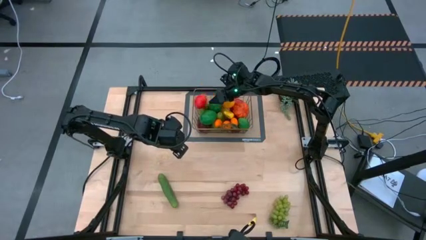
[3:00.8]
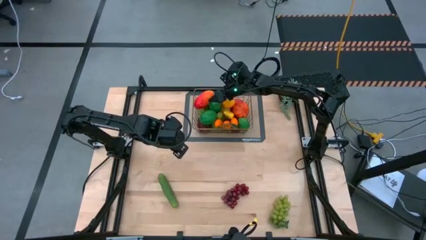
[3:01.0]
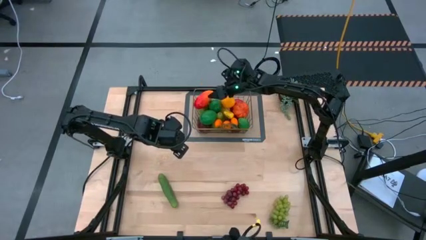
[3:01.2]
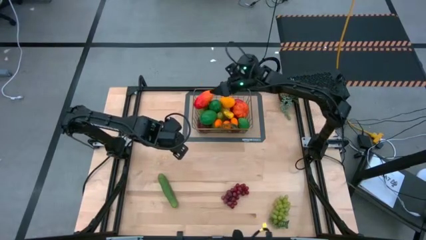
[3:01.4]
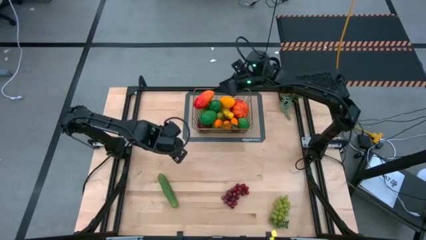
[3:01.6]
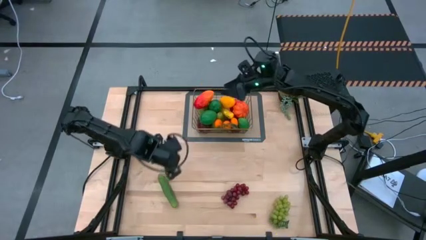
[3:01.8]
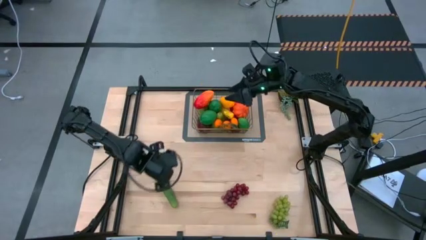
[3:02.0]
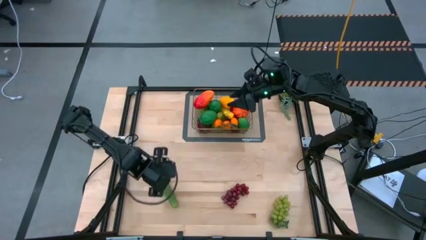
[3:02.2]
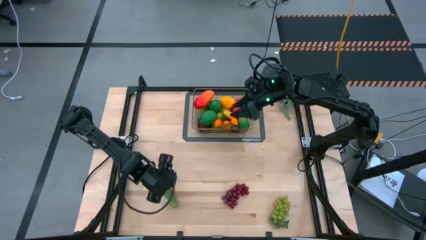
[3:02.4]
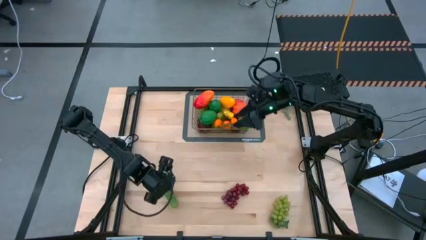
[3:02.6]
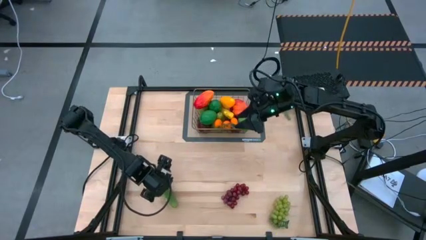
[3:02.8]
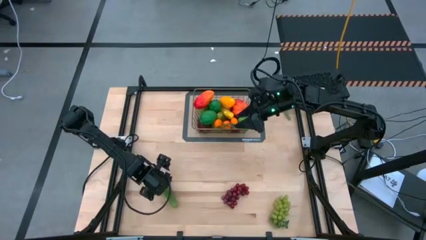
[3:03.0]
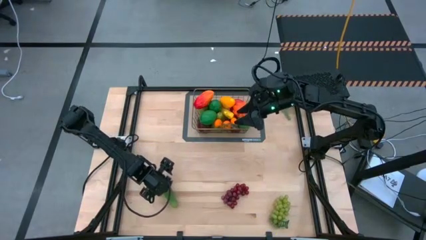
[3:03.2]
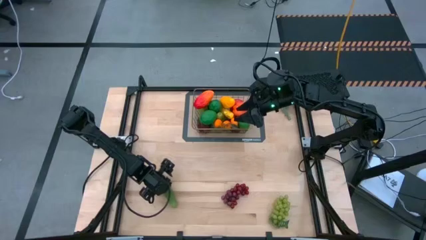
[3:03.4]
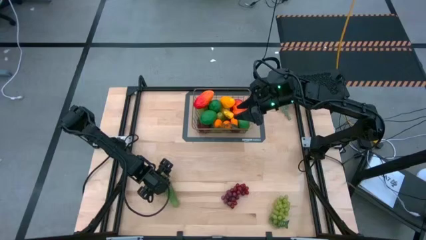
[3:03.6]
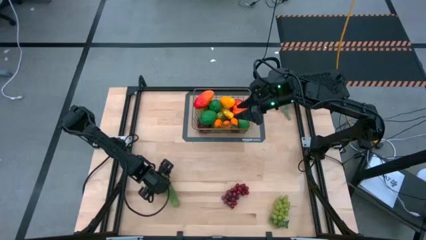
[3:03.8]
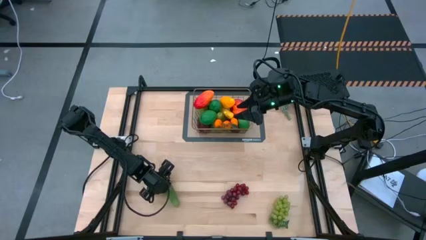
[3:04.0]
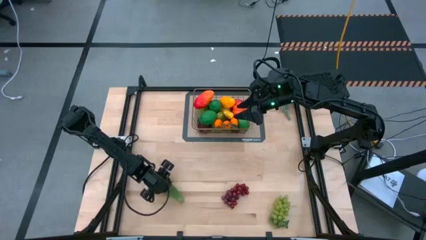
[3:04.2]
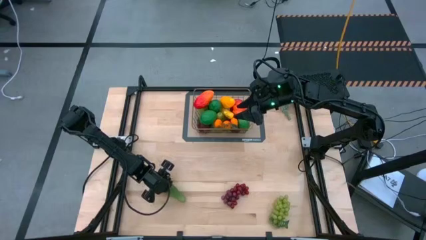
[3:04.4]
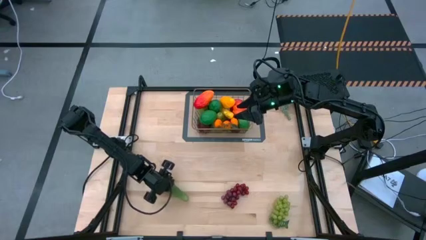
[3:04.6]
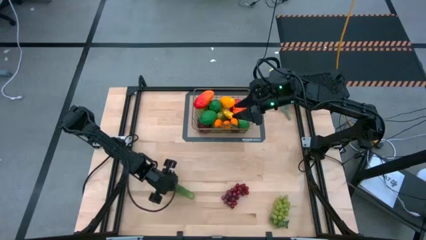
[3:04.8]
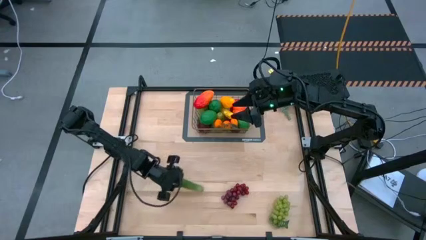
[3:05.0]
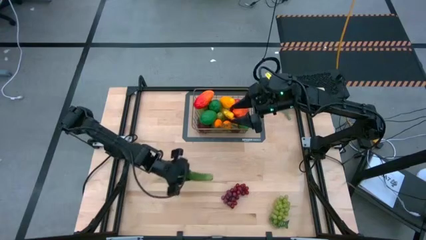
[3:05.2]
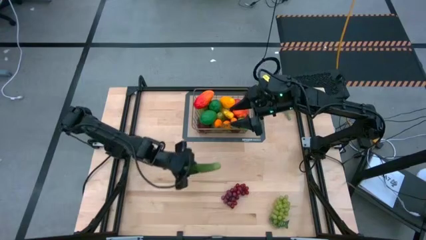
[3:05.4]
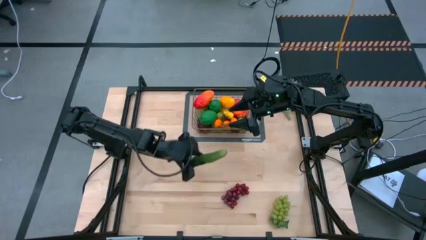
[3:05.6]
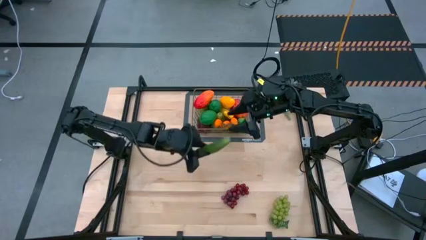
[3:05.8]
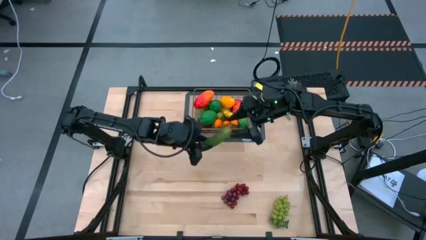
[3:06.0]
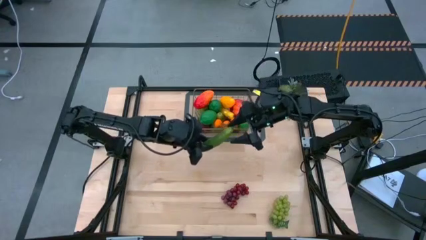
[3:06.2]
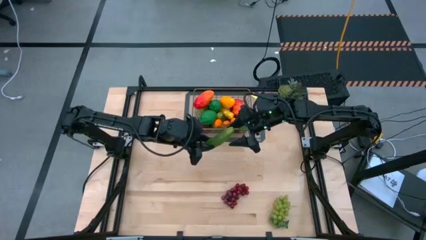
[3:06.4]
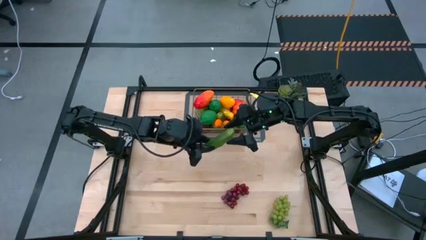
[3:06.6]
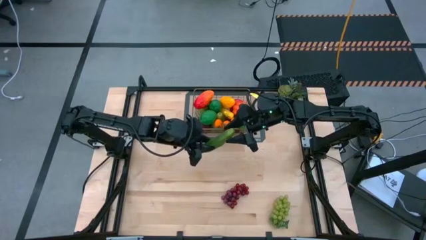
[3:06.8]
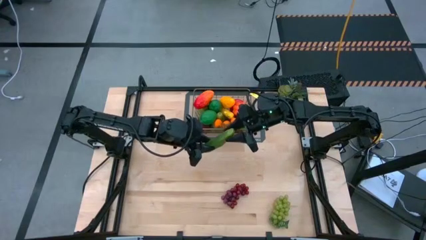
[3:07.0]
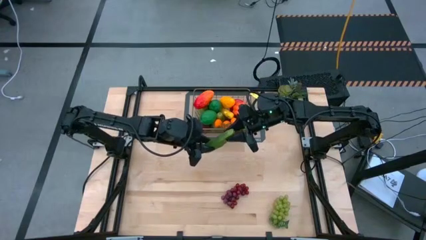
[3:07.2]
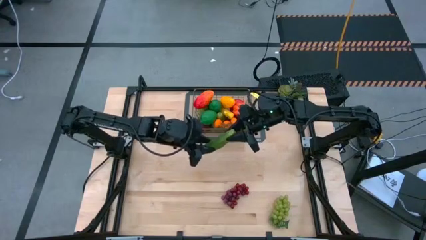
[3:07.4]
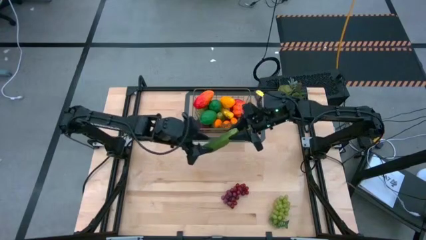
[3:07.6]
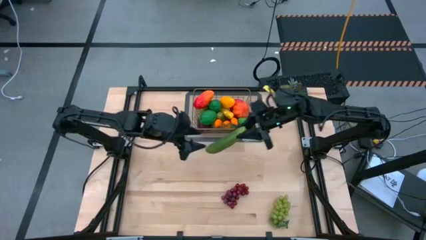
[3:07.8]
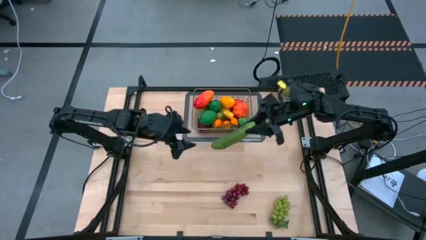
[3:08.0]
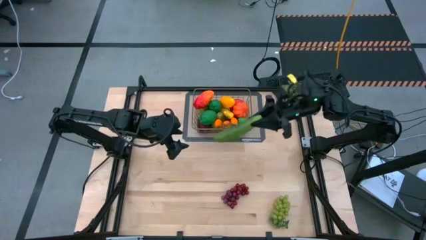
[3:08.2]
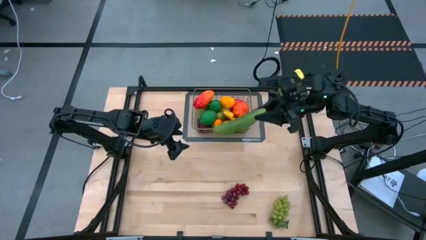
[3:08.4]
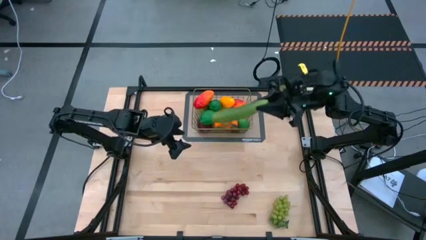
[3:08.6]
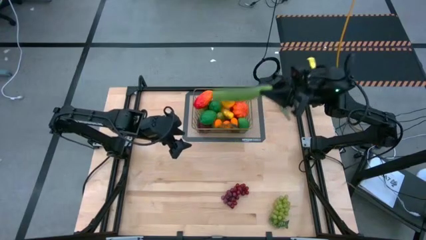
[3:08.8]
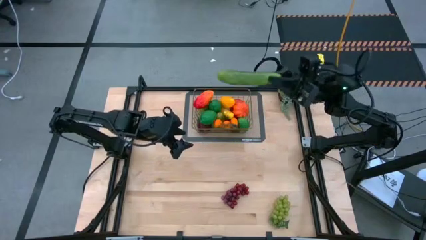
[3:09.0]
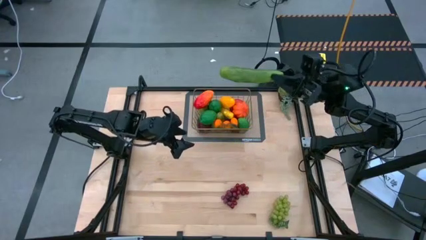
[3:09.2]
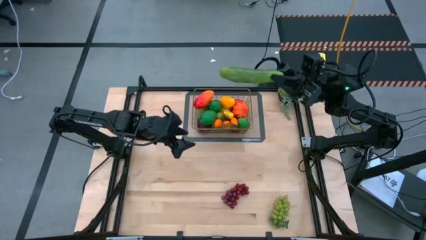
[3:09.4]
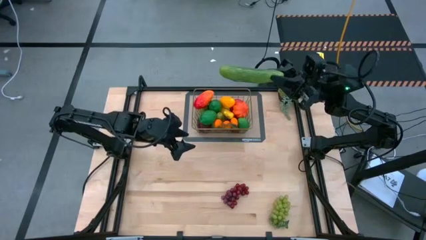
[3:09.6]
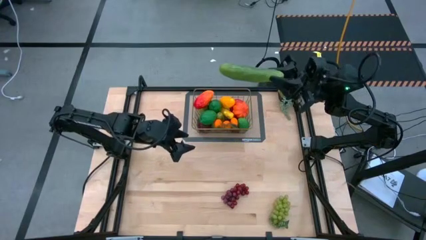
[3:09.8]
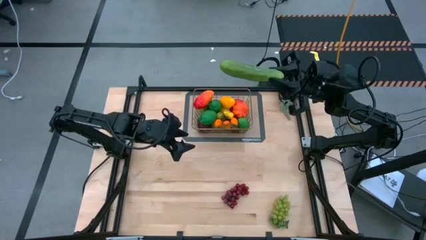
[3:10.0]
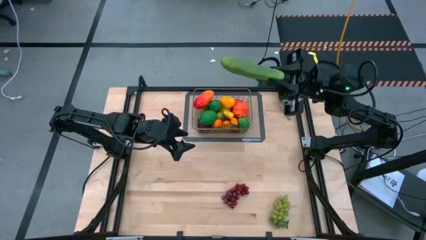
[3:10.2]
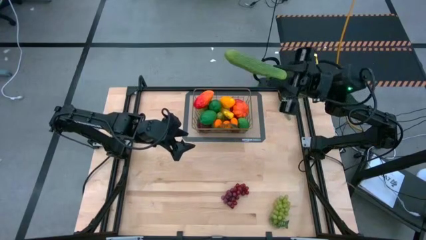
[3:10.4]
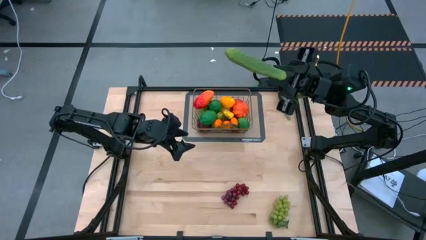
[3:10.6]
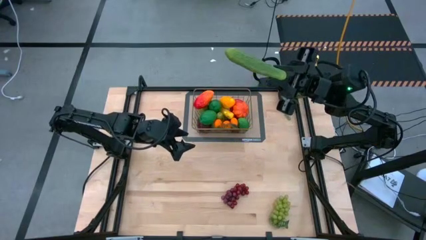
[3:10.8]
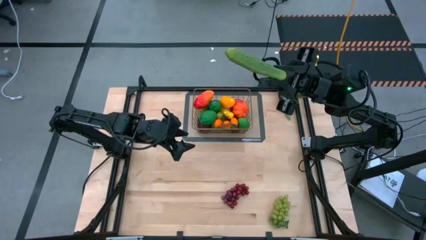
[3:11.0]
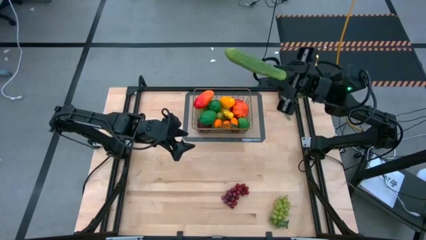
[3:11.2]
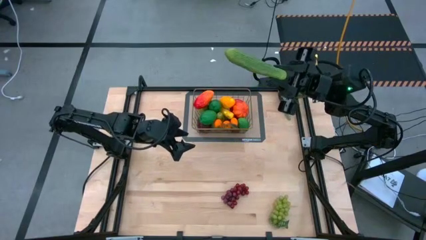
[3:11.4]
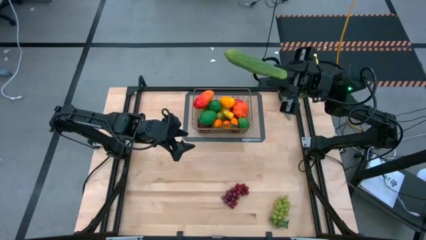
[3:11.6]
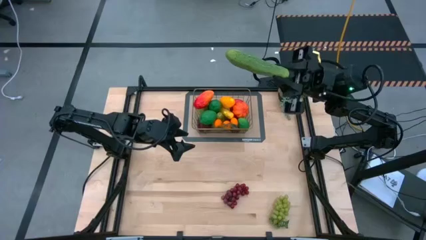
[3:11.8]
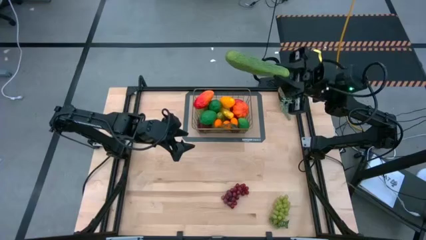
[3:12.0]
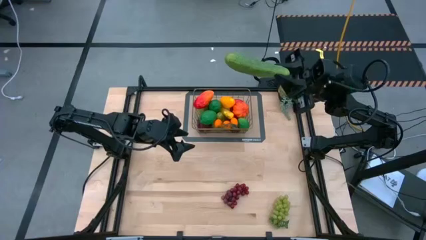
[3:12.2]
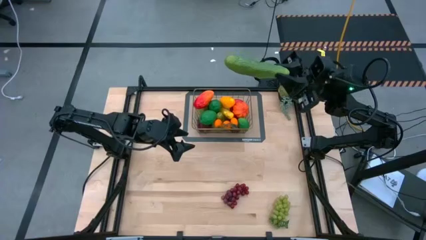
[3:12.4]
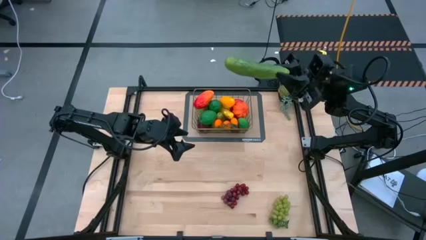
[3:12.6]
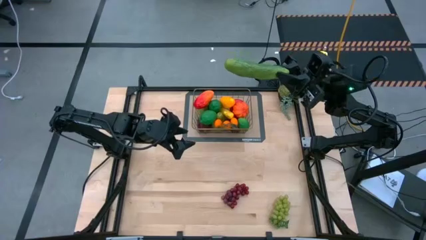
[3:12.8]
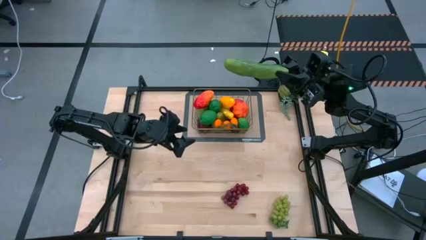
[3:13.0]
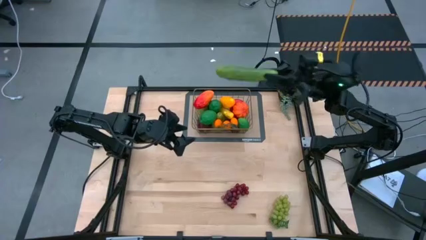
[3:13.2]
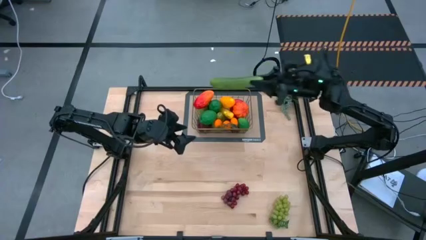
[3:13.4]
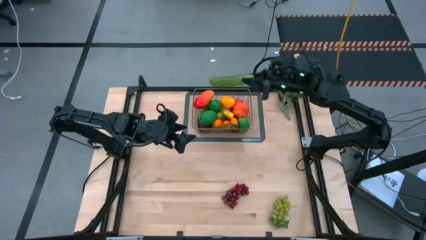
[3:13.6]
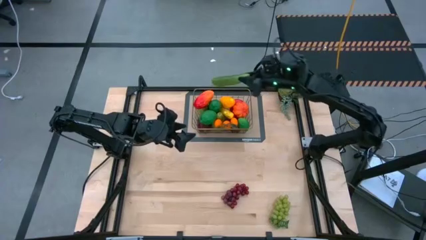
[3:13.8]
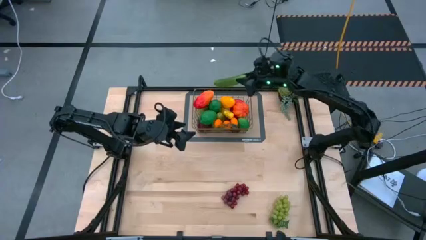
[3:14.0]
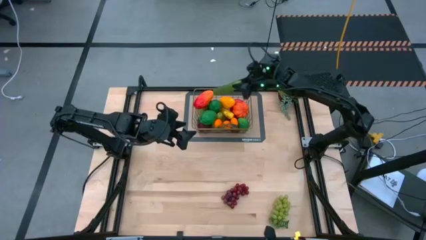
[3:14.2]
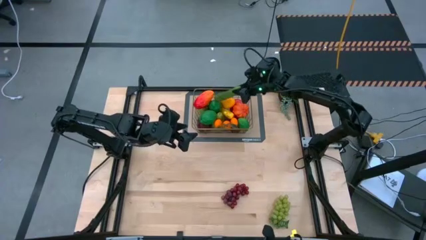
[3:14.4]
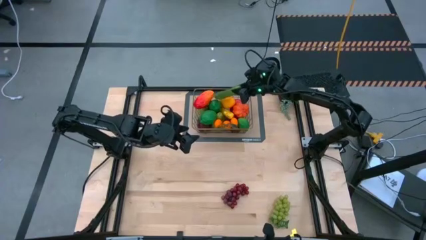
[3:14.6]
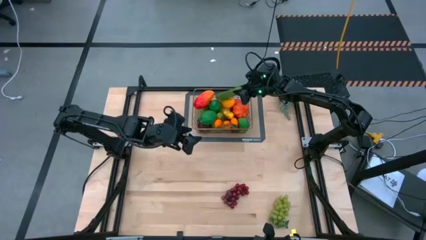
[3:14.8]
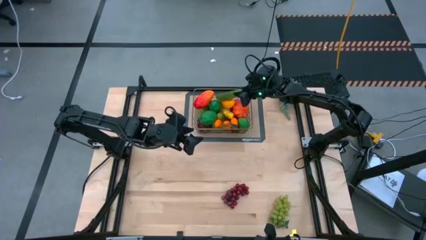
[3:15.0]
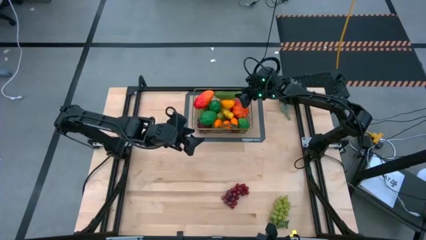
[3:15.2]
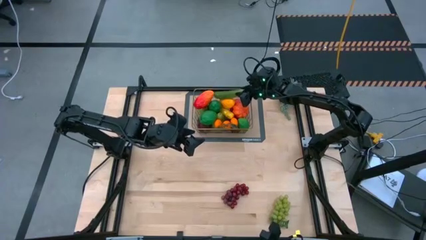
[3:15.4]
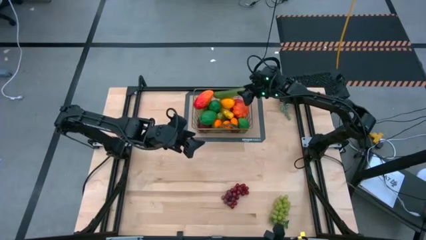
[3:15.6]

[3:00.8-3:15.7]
Task: Build produce basket
Put the green cucumber into the brown wire basket

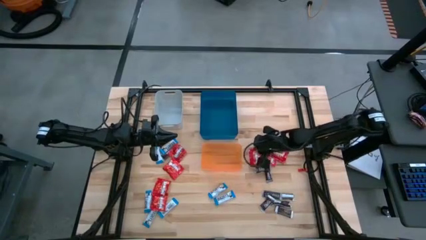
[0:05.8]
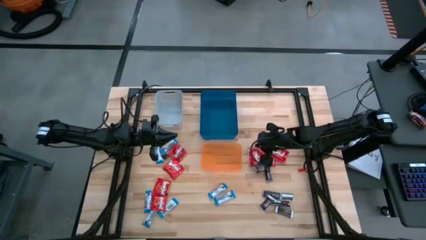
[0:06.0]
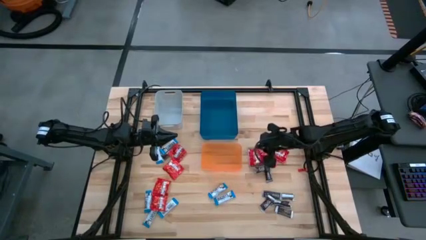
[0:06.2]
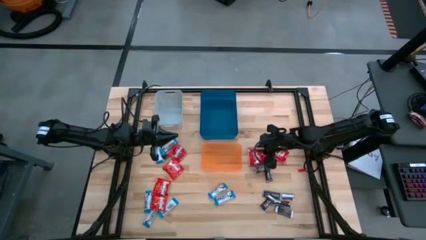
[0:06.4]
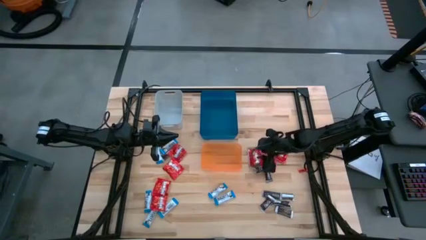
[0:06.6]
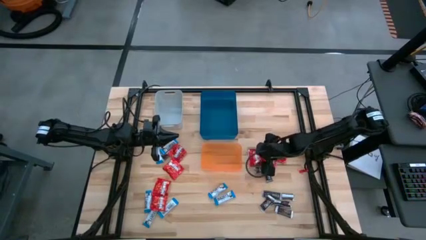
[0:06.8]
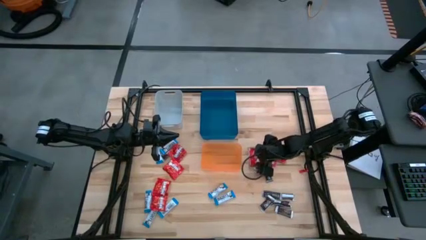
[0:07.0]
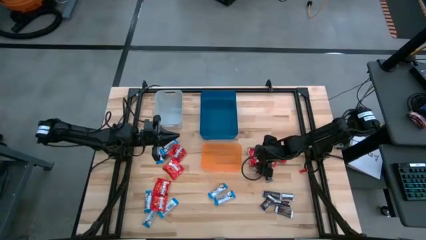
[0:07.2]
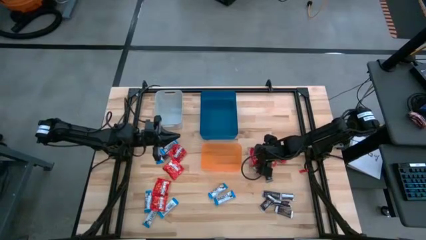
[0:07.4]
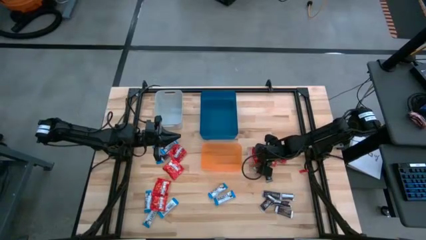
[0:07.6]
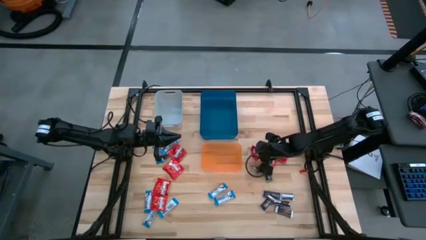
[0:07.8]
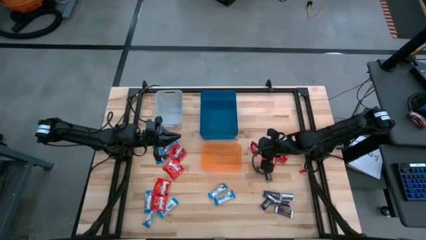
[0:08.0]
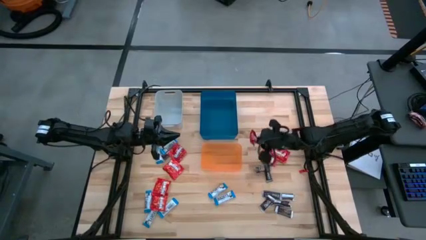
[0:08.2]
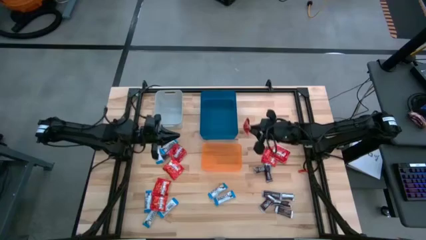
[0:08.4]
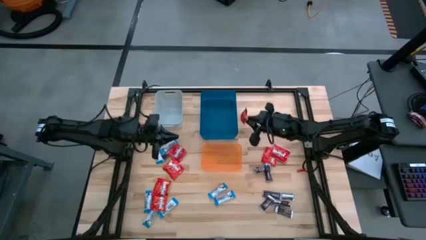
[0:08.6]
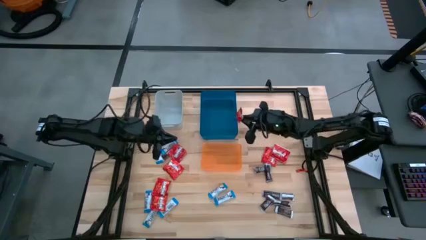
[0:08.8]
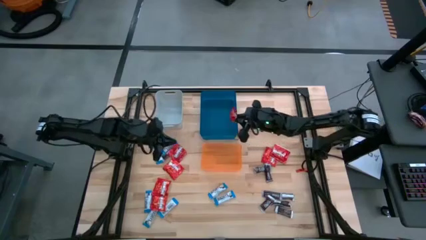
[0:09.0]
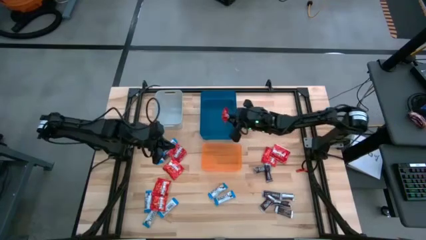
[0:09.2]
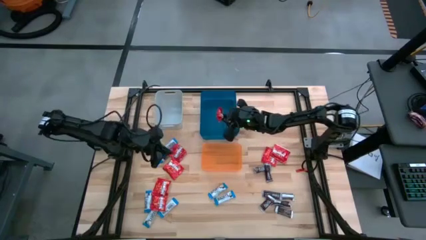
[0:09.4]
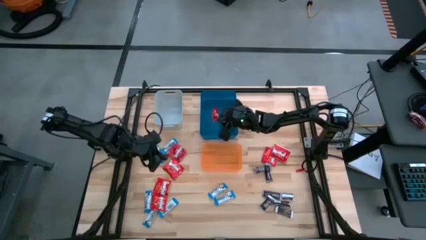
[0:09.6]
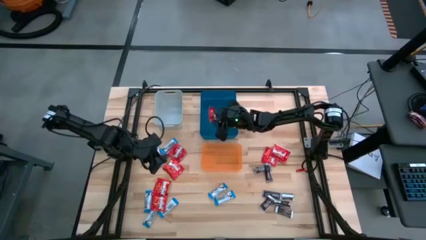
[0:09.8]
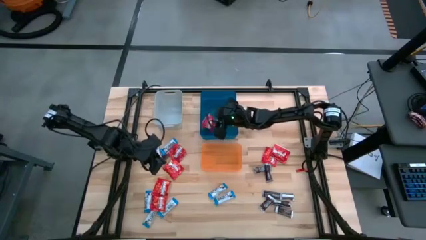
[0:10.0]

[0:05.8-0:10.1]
Task: Sort candy
Put the red candy into the blue bin
